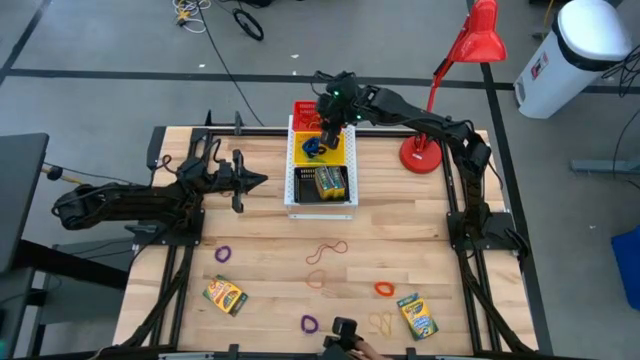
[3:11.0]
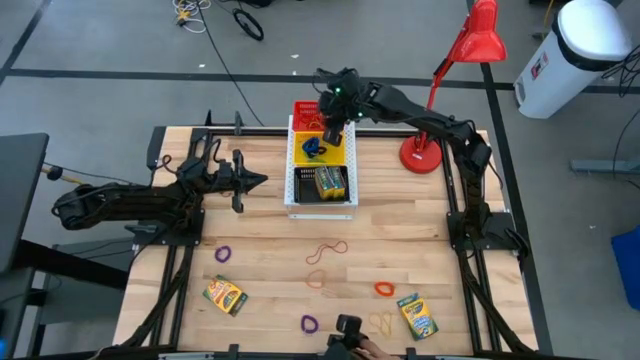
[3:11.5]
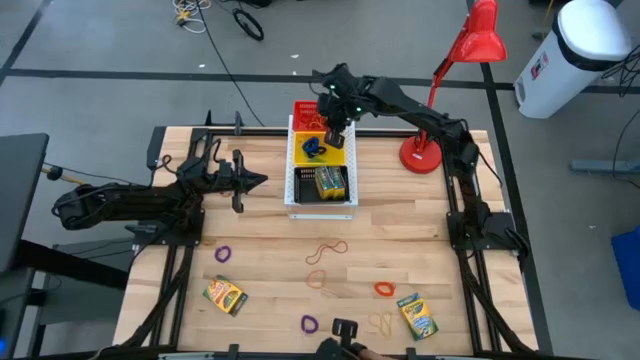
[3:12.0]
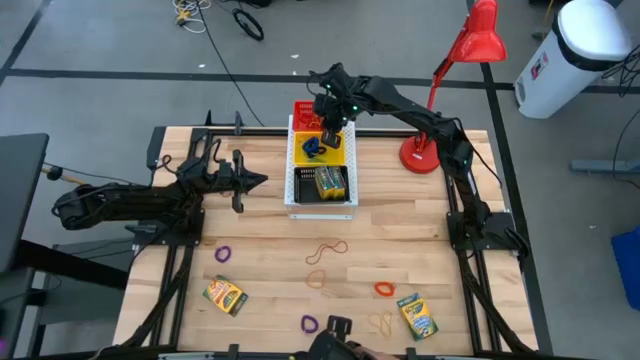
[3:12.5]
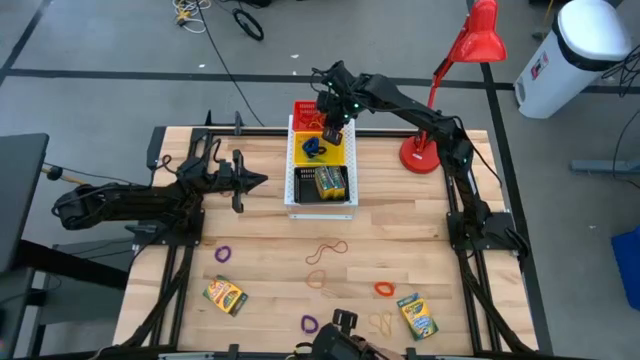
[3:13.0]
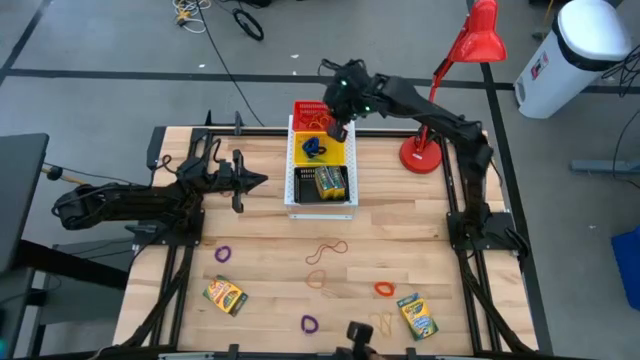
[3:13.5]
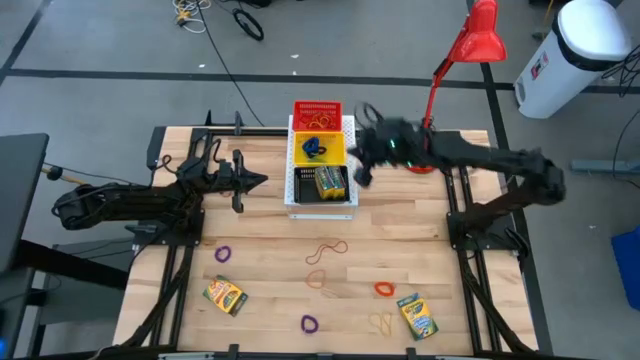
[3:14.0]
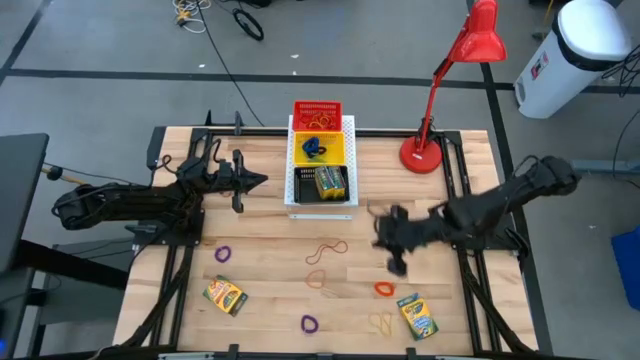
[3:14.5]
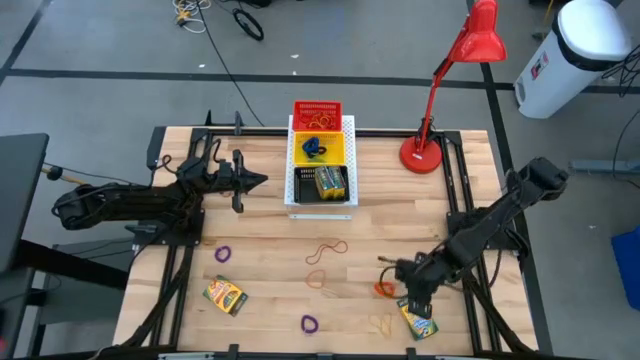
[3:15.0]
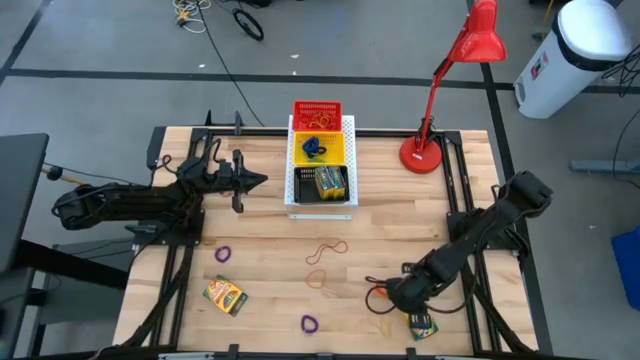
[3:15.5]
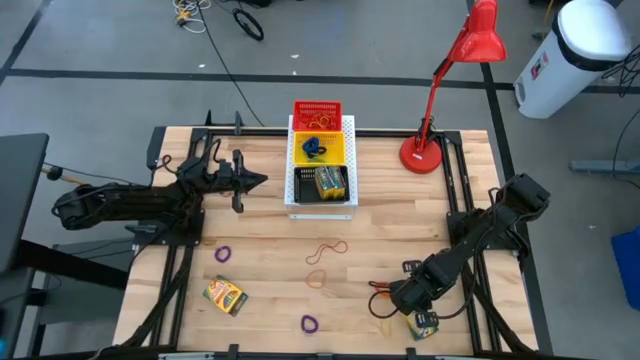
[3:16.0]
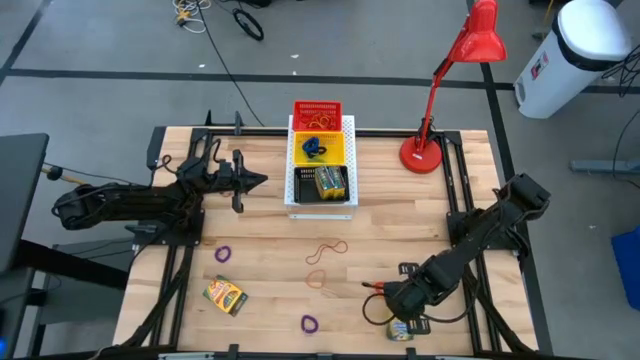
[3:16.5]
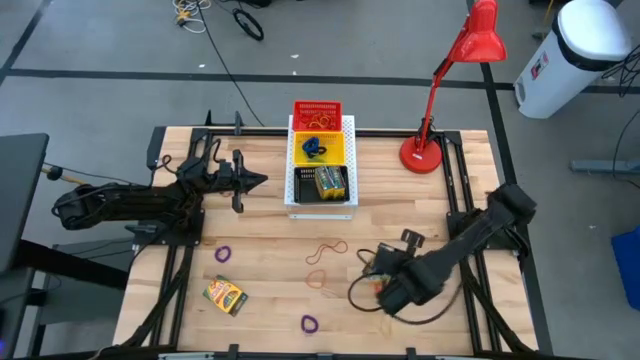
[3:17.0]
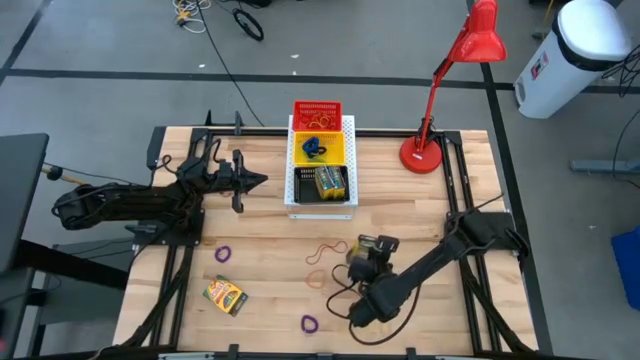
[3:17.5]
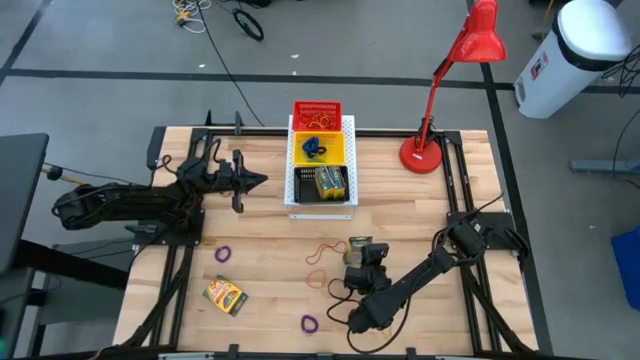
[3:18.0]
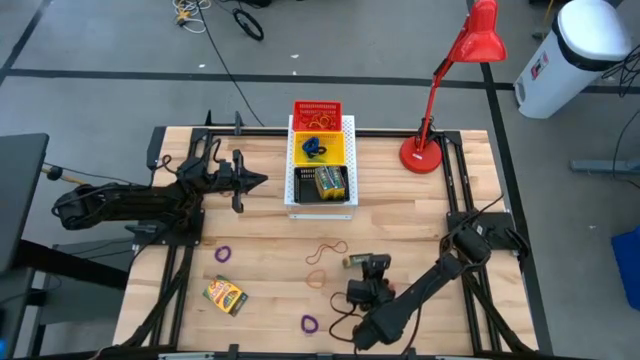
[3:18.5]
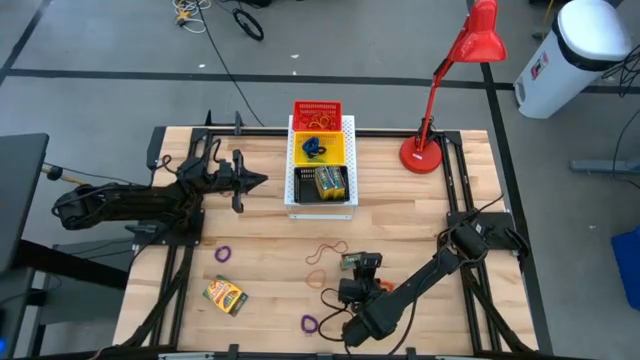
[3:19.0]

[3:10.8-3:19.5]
Task: Pick & Place Office Desk Supplies
Put the yellow crayon box into the black bin on the shelf

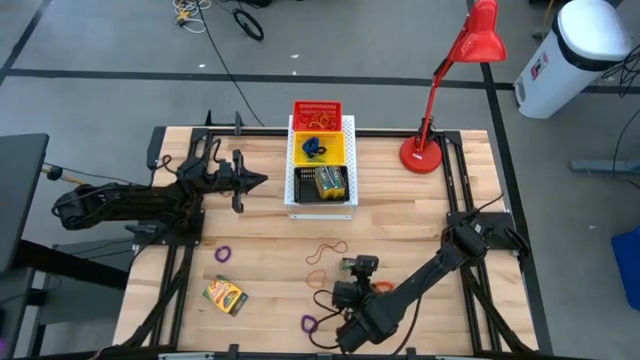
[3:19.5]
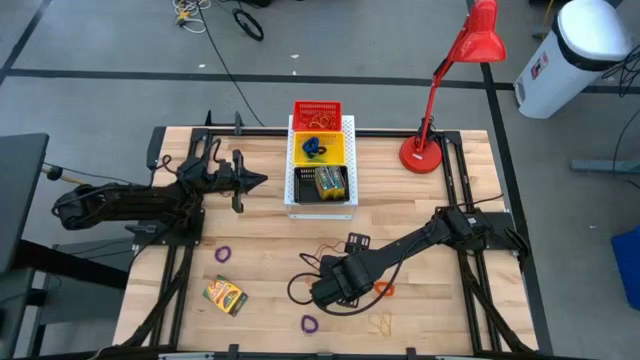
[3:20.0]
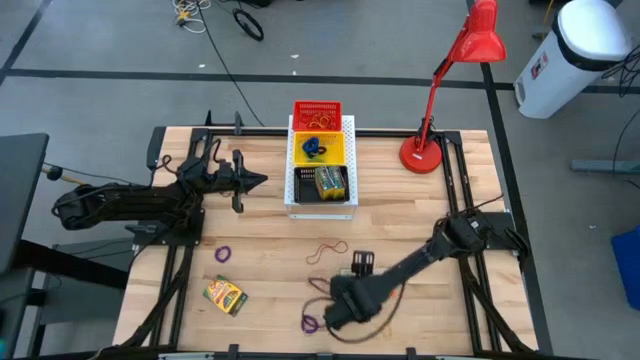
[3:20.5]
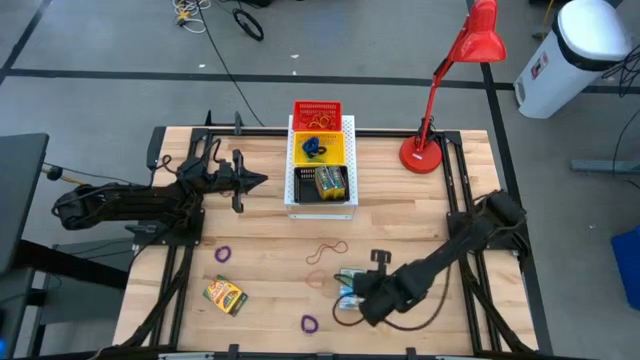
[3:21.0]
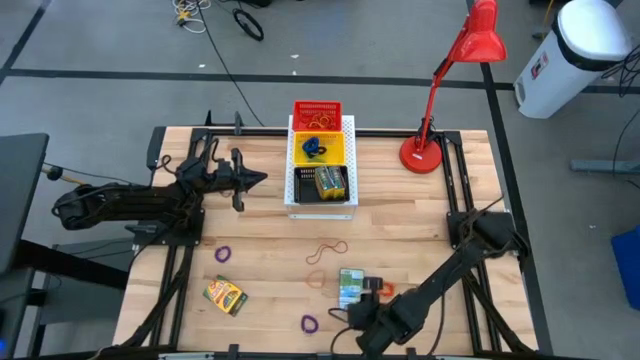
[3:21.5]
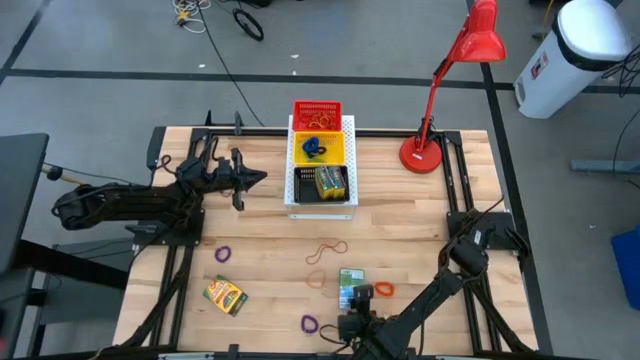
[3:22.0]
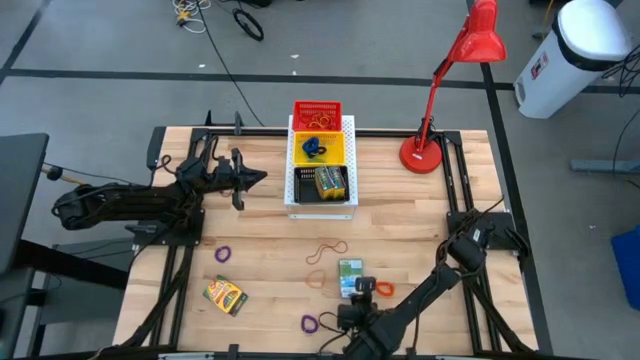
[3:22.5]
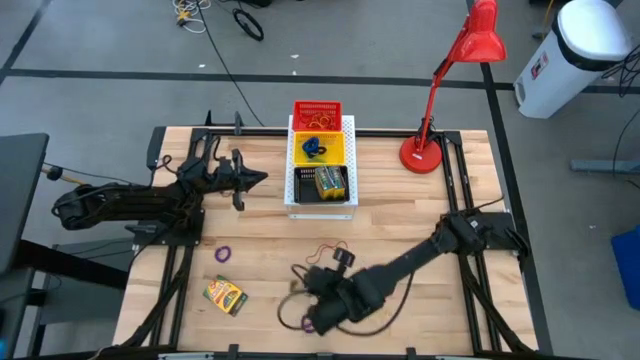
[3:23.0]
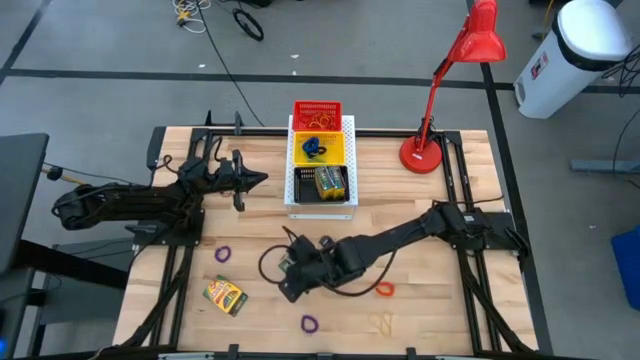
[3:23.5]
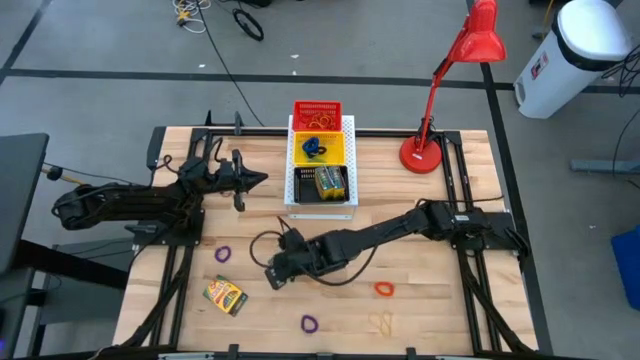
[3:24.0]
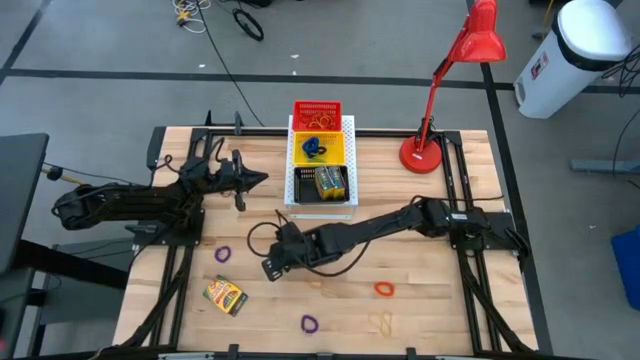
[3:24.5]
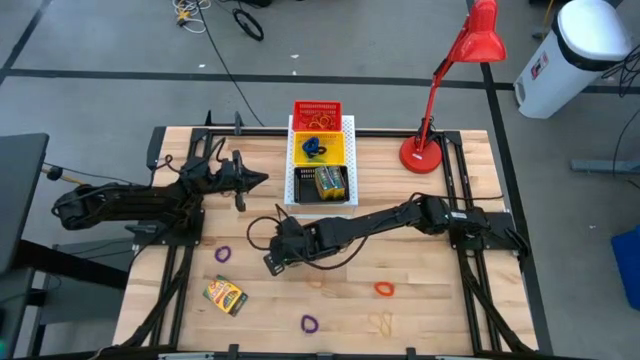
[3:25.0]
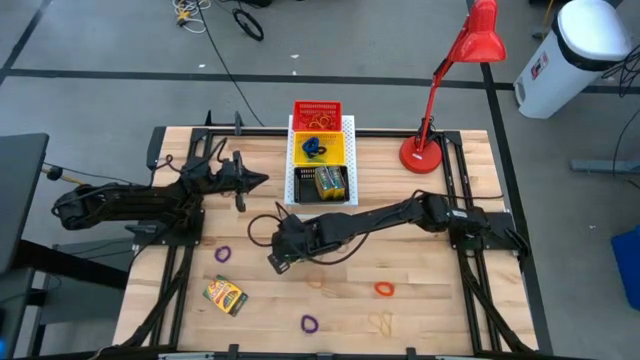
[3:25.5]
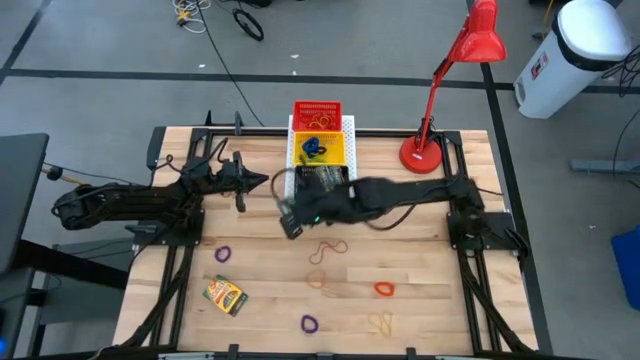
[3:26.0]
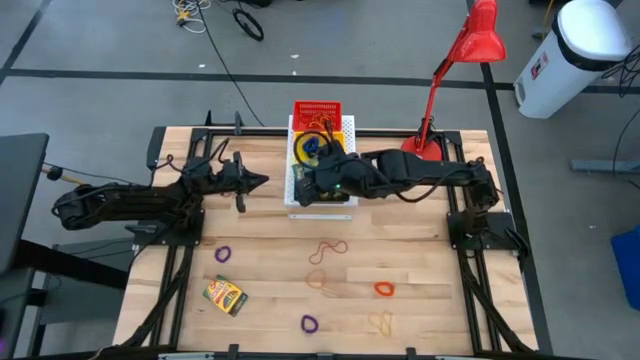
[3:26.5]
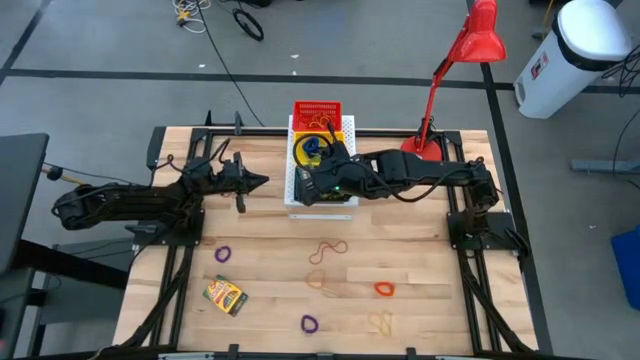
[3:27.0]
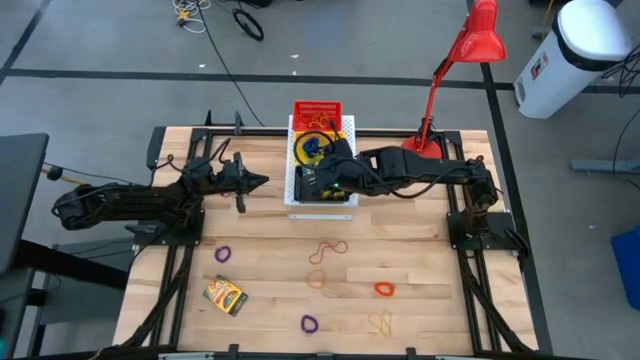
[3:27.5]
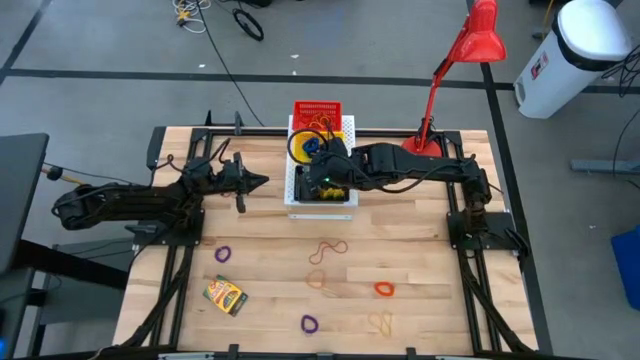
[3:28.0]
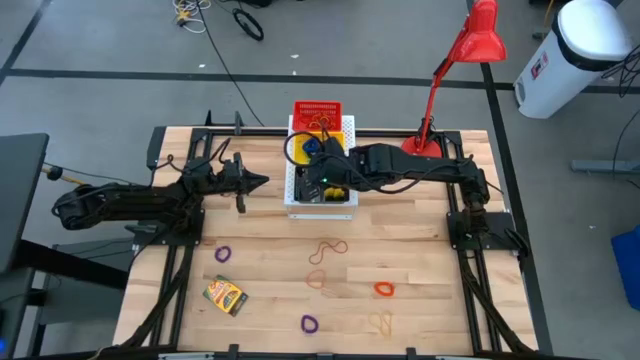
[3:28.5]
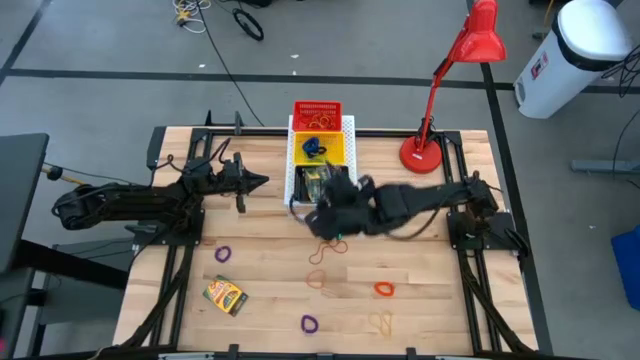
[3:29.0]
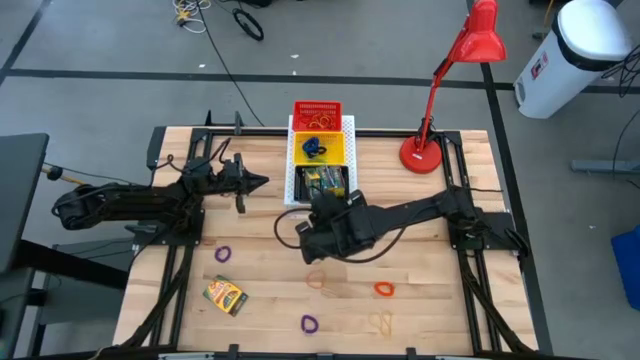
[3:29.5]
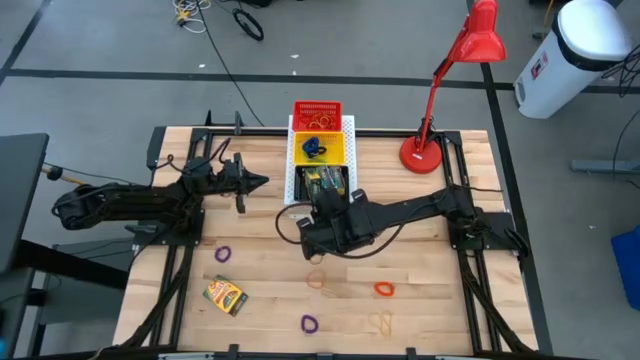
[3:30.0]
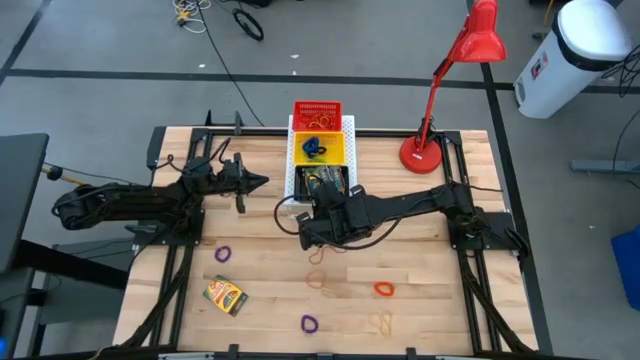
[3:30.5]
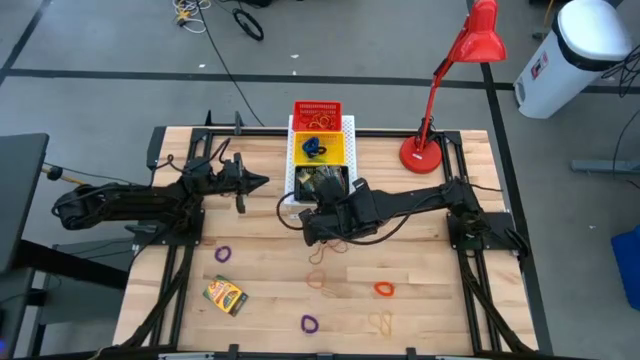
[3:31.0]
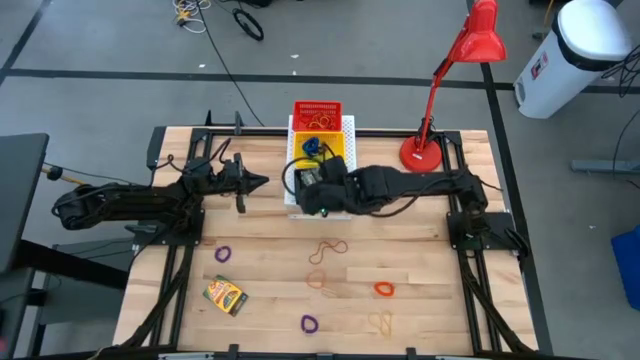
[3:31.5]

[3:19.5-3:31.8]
Put the yellow crayon box into the black bin on the shelf
